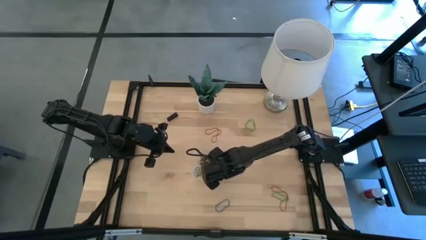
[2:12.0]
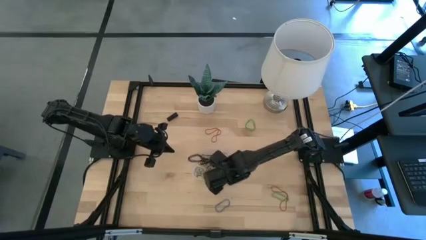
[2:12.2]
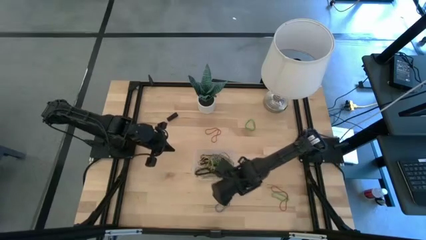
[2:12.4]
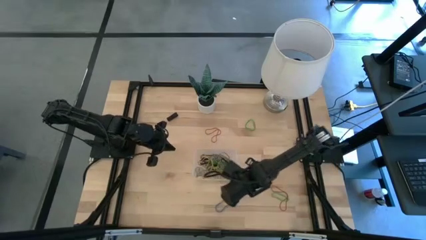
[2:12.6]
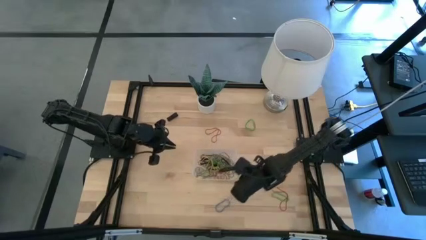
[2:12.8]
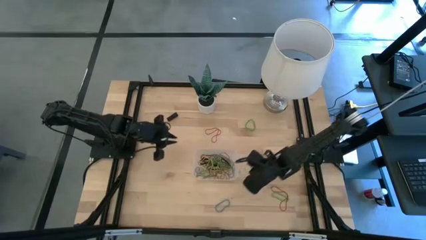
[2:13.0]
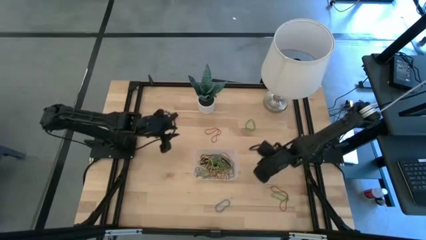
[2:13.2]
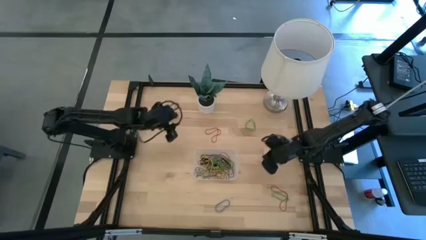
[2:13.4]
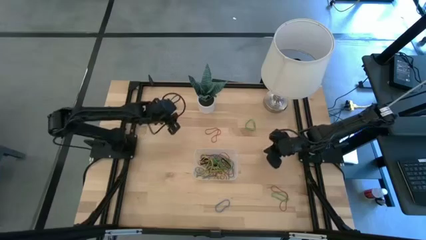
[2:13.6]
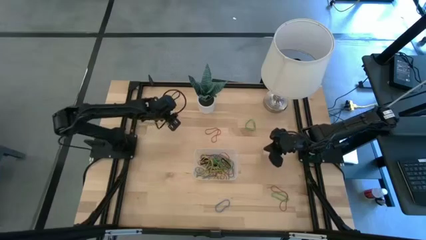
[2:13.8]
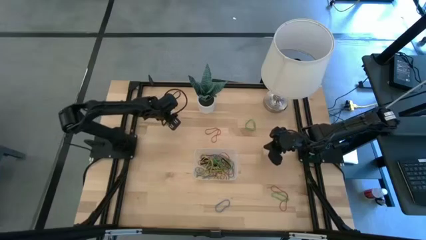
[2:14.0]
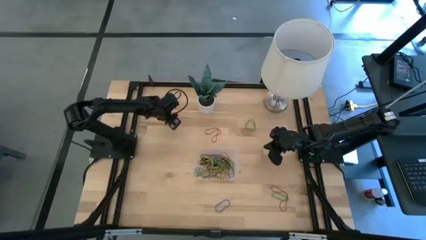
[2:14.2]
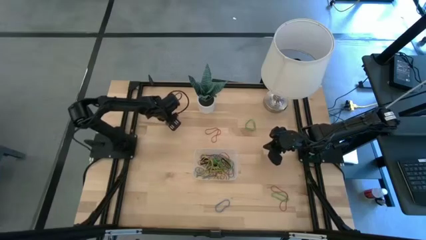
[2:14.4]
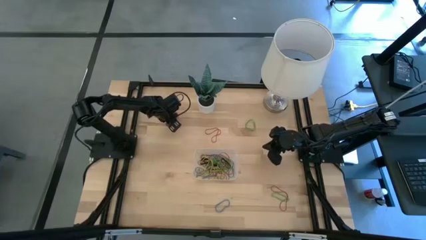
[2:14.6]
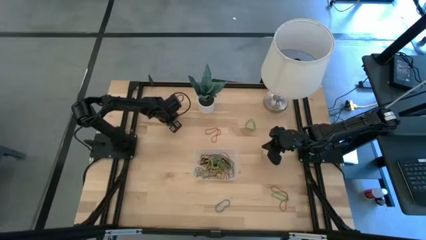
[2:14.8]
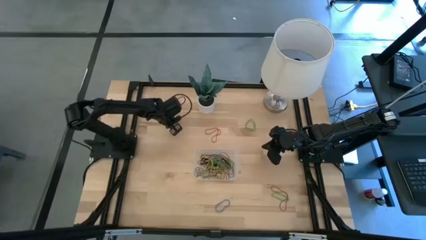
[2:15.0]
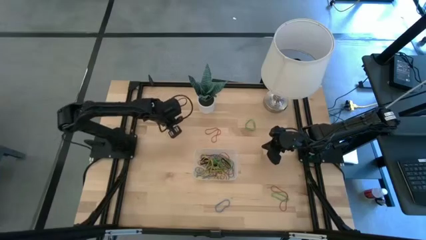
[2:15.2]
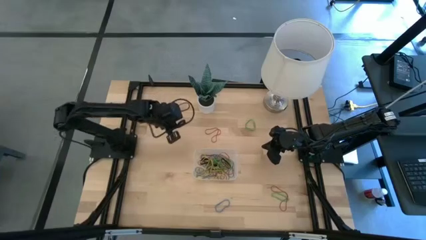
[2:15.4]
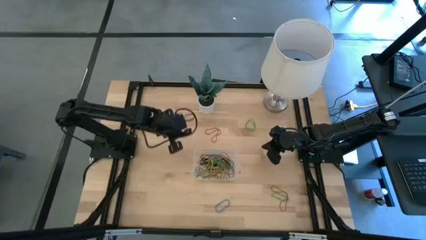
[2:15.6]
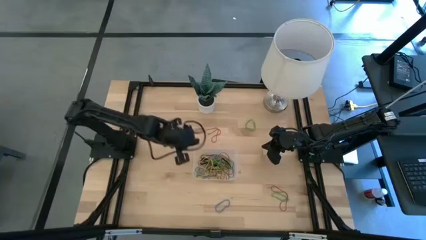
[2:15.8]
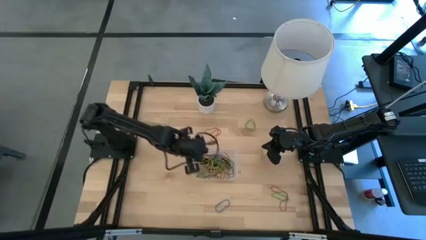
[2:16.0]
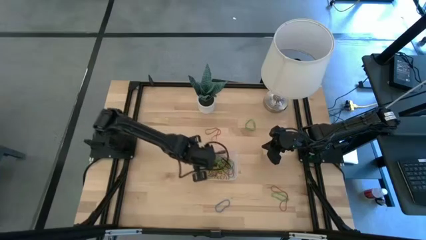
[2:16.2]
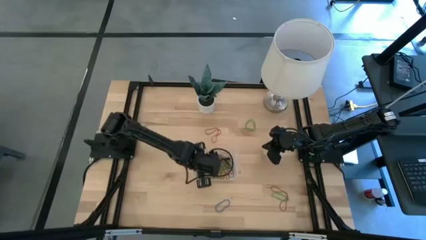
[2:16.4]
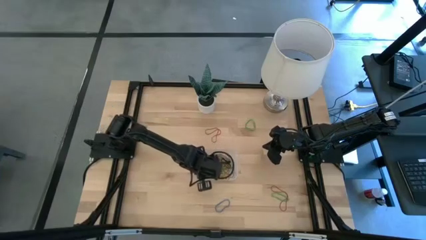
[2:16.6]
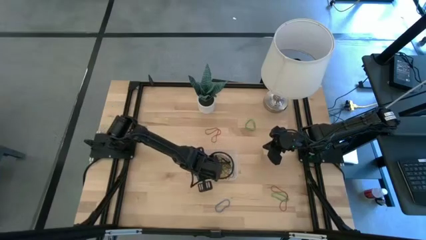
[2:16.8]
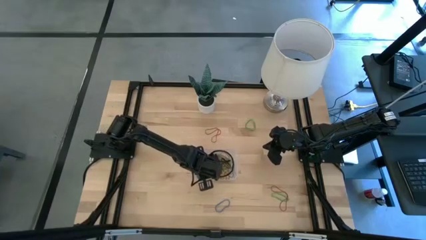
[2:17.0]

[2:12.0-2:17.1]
Task: Pick and place rubber bands into bin
Put the black rubber band into the transparent bin

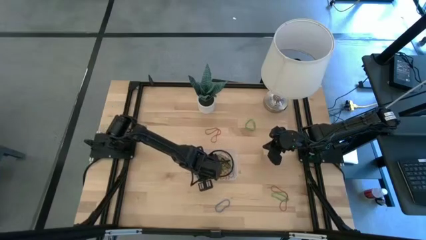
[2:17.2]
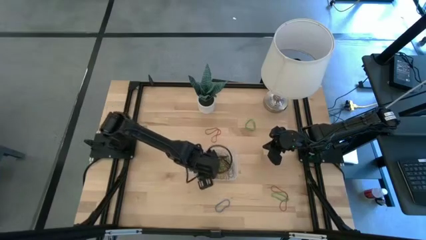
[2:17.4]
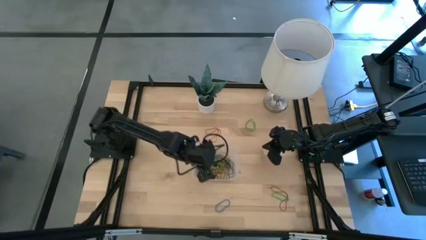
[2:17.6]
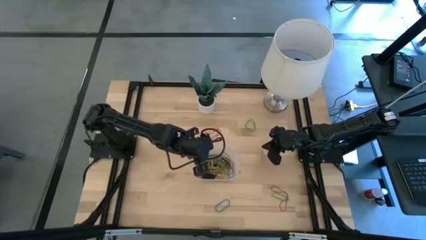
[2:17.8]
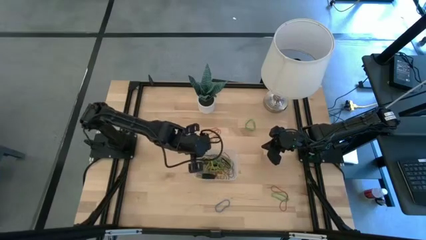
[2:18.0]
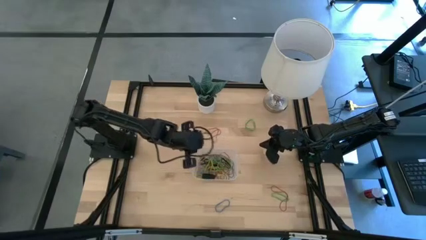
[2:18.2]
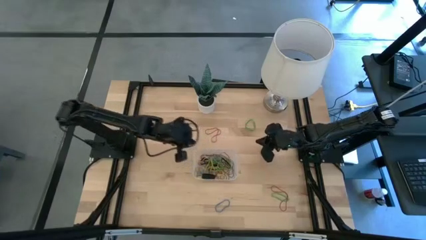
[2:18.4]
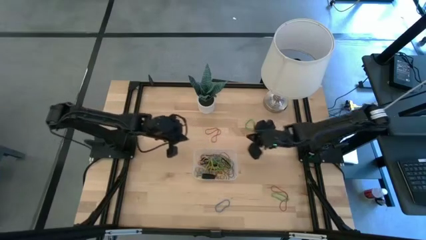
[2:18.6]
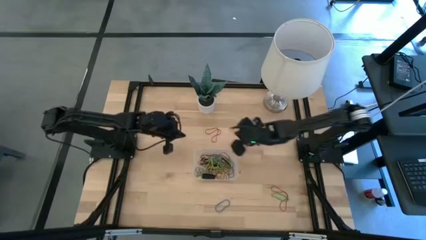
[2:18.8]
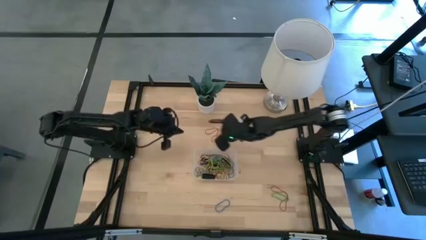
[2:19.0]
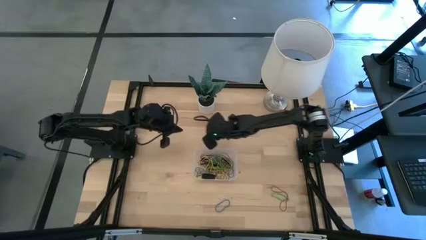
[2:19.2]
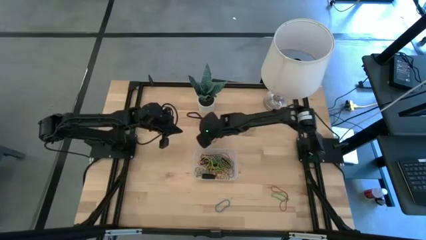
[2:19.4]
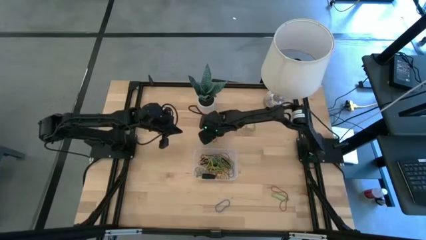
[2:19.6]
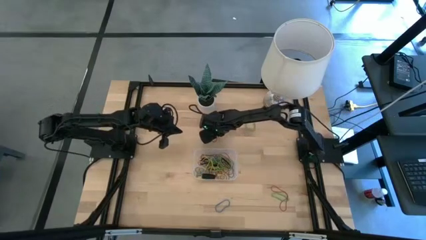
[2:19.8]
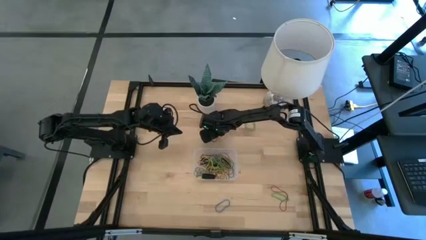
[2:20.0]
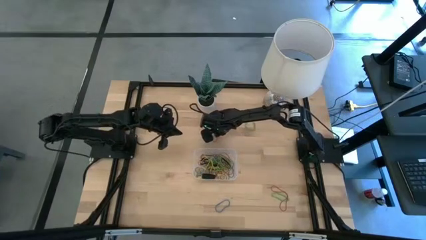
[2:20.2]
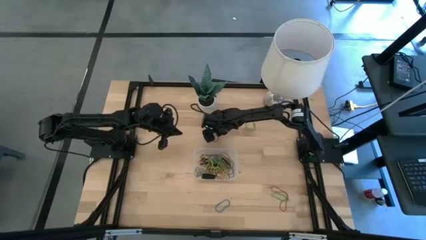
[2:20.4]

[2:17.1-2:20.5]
Put the top red rubber band into the transparent bin

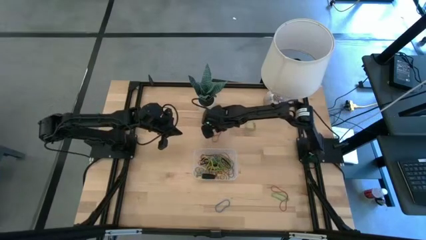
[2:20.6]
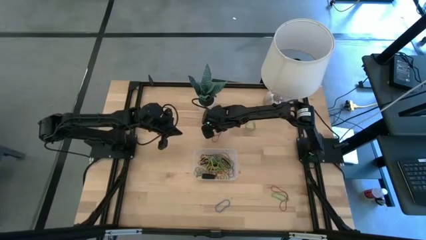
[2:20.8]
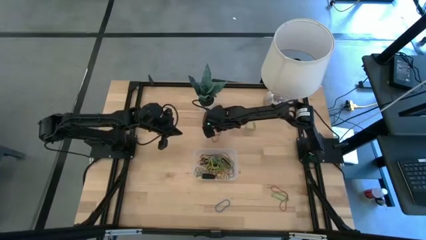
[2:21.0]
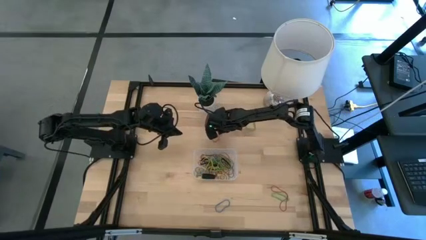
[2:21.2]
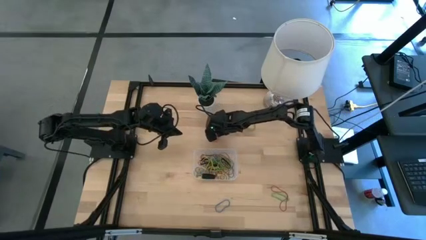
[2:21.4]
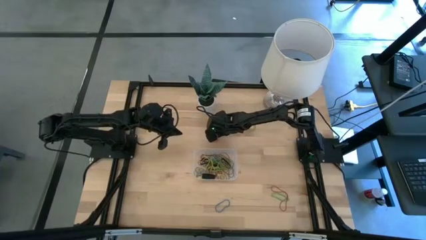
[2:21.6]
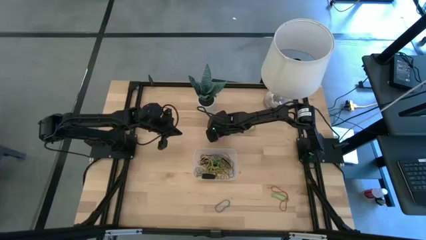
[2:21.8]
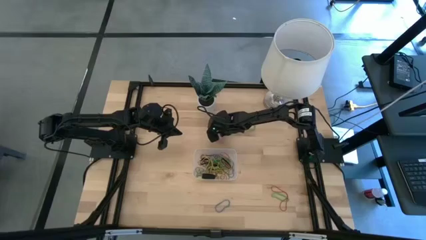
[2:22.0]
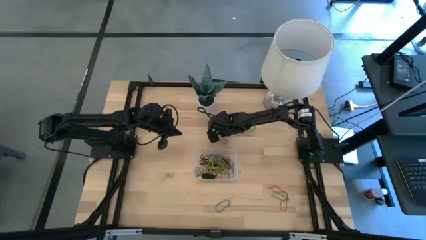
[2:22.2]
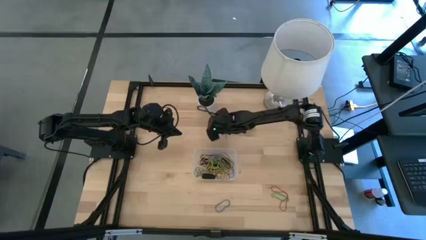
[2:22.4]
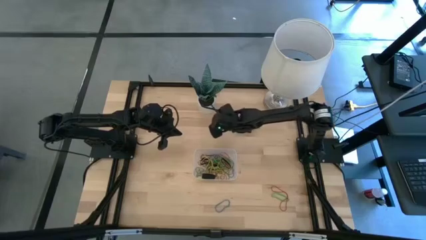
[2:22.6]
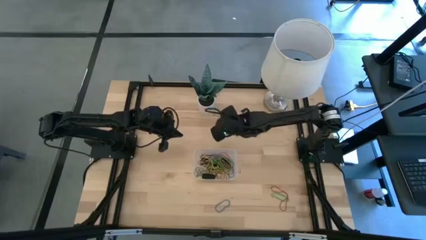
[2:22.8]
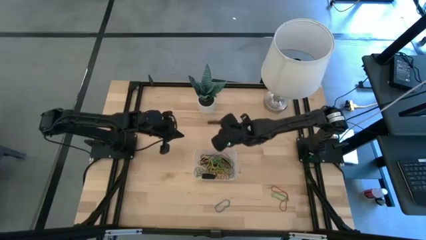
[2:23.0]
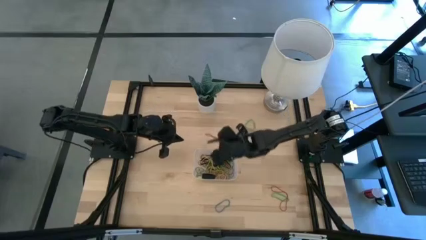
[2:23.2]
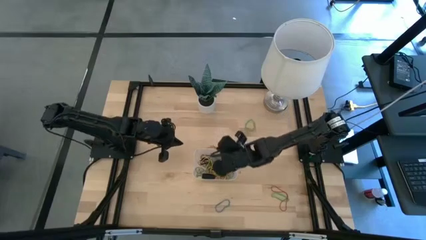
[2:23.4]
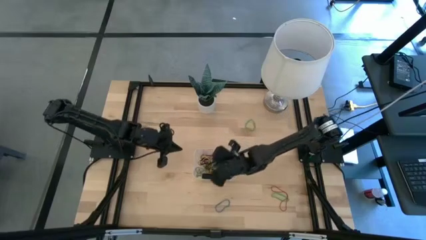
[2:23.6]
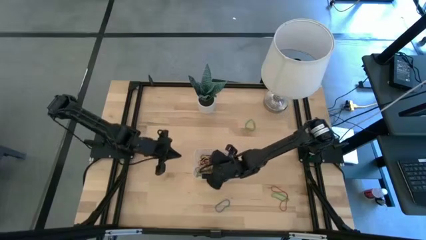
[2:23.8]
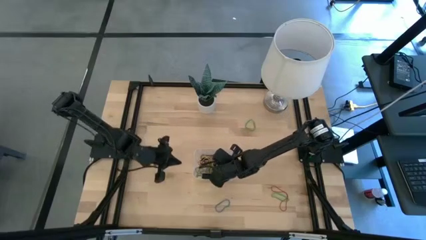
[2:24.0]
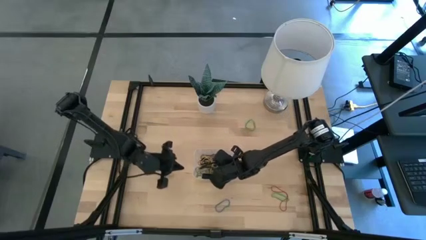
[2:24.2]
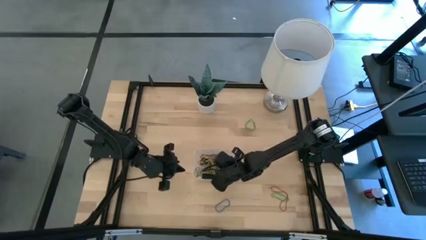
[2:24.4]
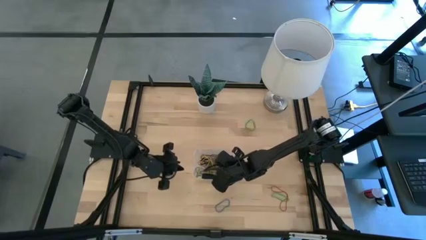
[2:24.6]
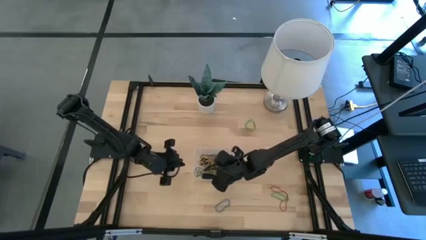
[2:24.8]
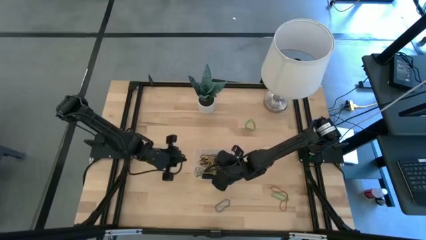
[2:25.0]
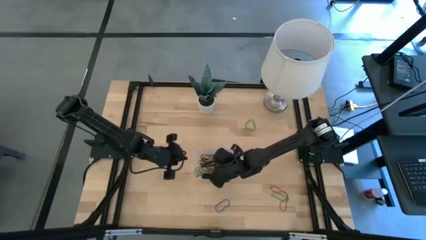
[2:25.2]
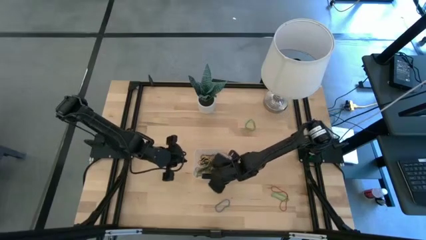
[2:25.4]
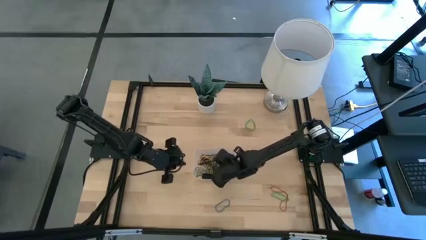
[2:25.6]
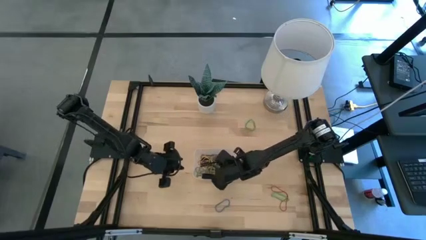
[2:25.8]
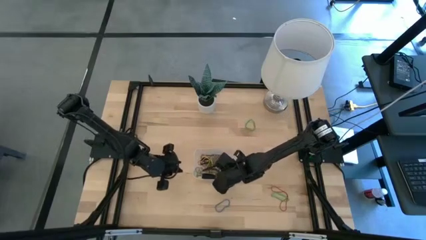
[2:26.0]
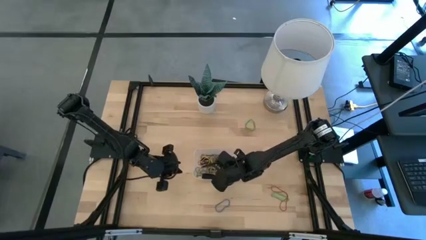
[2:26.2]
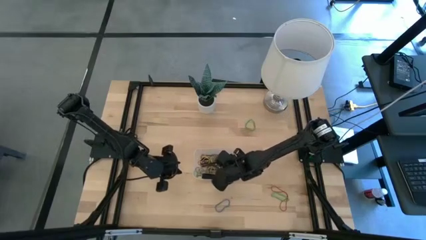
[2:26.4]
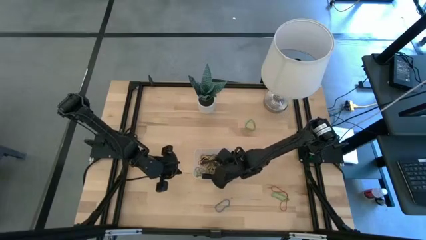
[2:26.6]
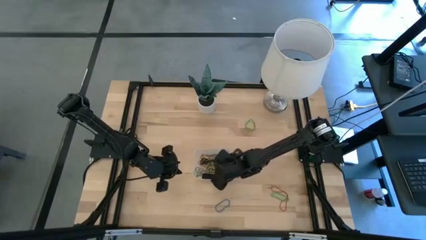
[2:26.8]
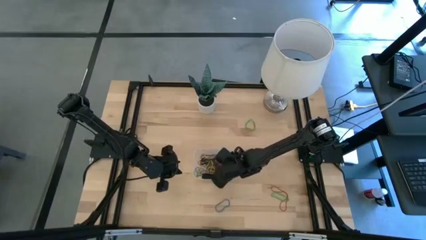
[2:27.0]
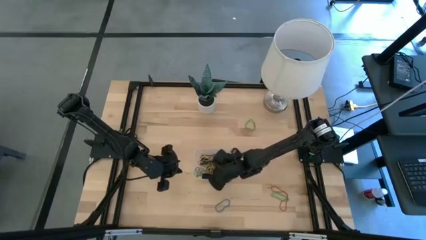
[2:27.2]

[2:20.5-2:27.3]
Put the top red rubber band into the transparent bin
